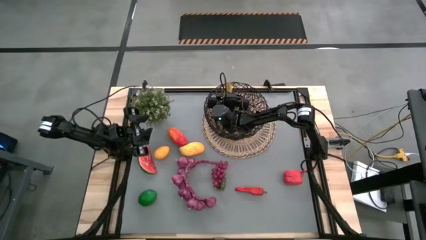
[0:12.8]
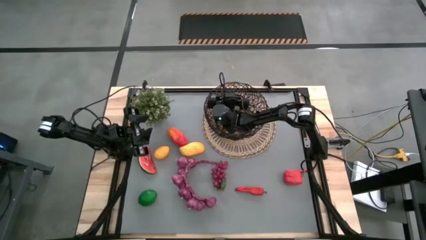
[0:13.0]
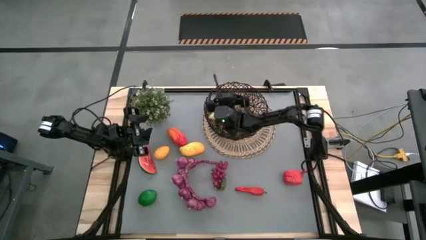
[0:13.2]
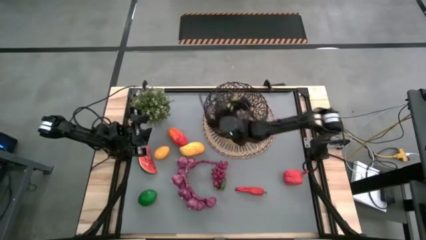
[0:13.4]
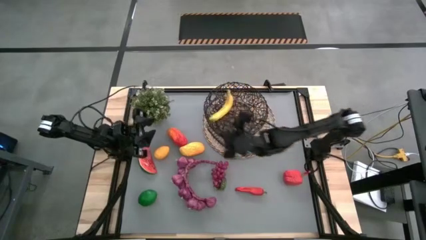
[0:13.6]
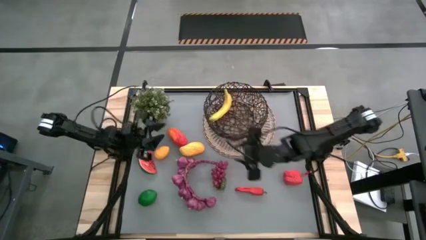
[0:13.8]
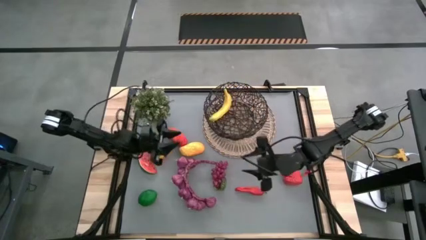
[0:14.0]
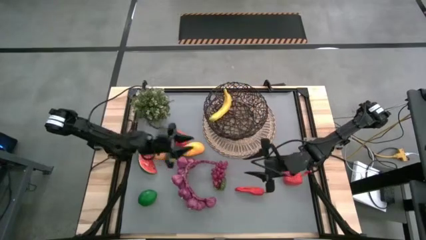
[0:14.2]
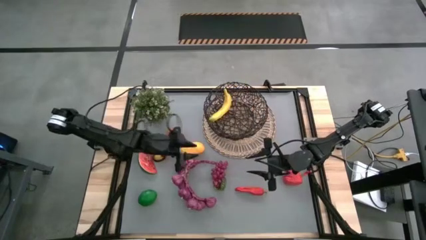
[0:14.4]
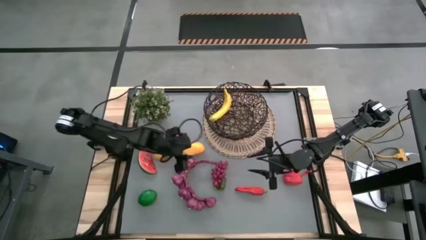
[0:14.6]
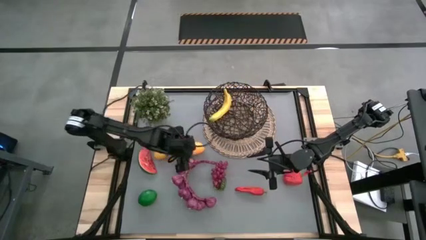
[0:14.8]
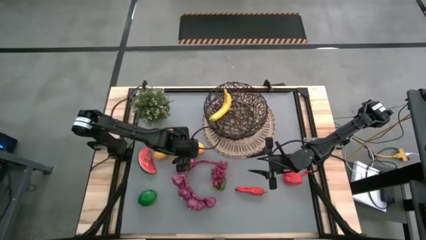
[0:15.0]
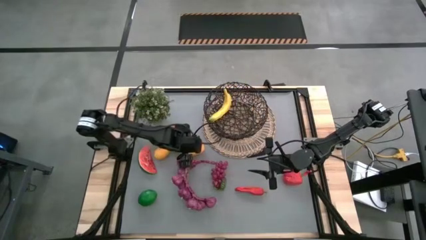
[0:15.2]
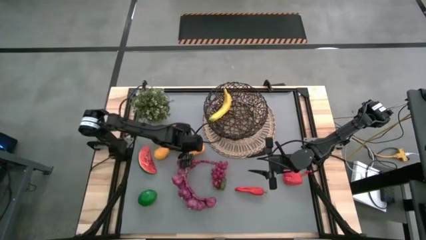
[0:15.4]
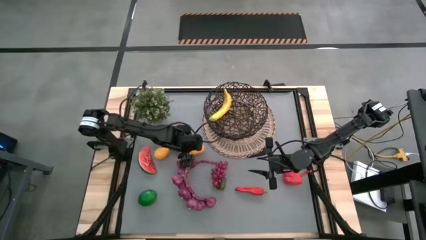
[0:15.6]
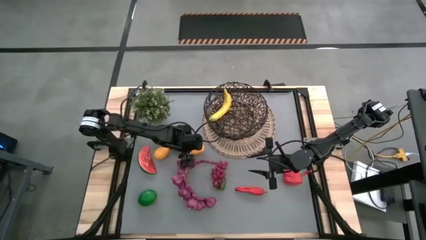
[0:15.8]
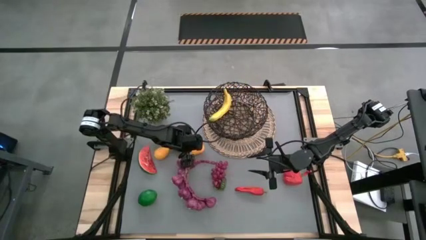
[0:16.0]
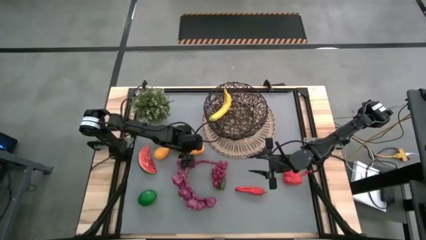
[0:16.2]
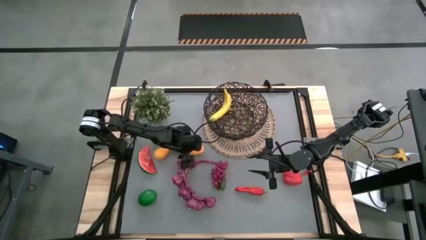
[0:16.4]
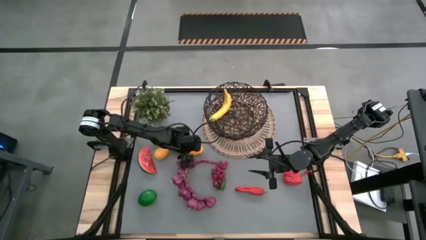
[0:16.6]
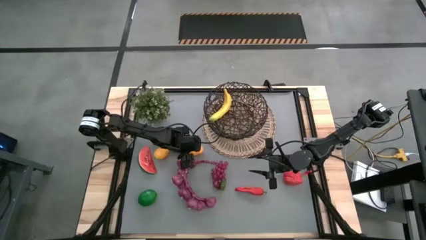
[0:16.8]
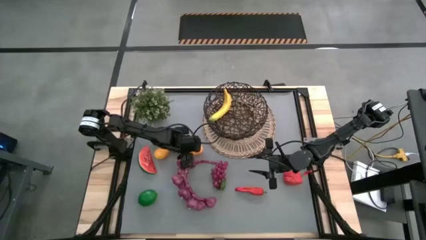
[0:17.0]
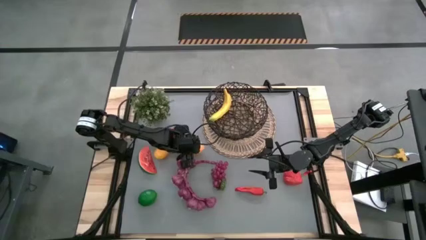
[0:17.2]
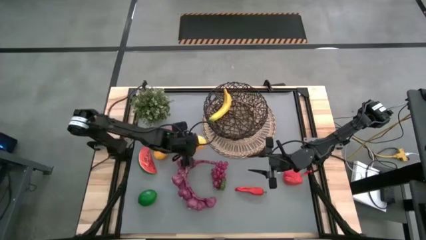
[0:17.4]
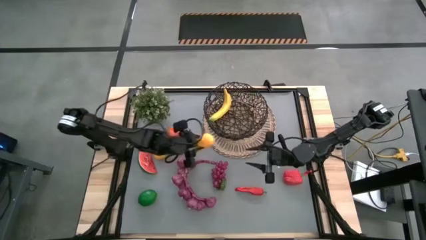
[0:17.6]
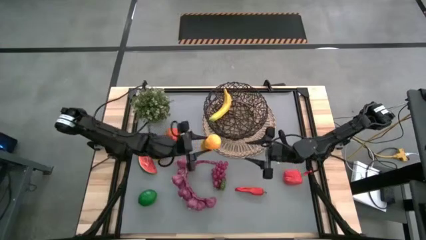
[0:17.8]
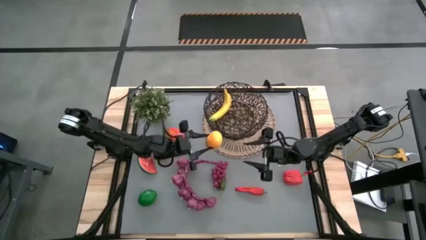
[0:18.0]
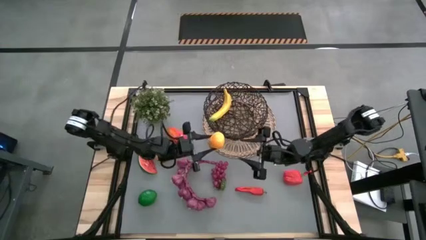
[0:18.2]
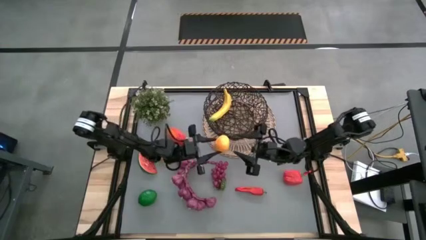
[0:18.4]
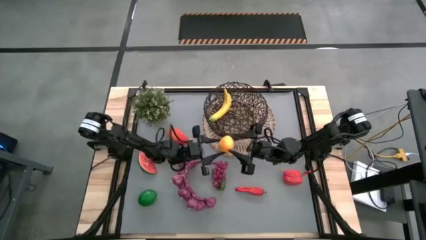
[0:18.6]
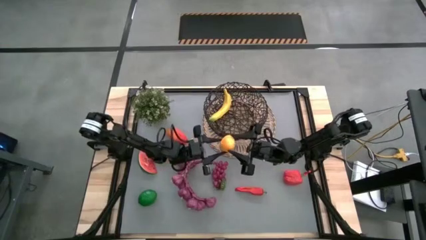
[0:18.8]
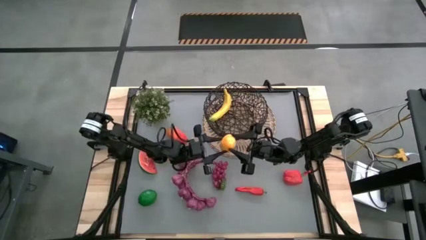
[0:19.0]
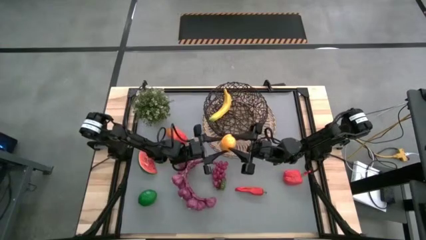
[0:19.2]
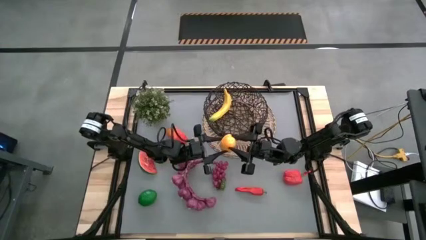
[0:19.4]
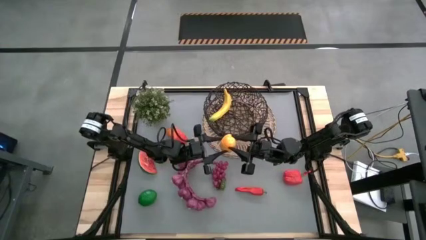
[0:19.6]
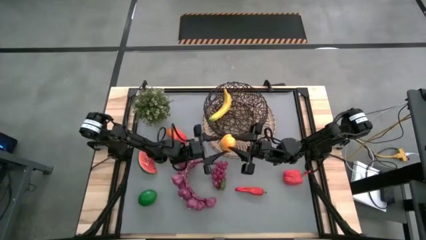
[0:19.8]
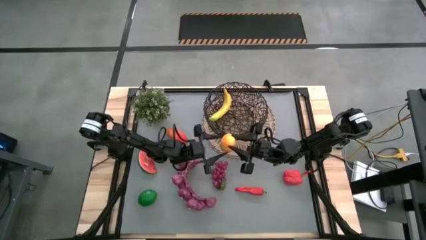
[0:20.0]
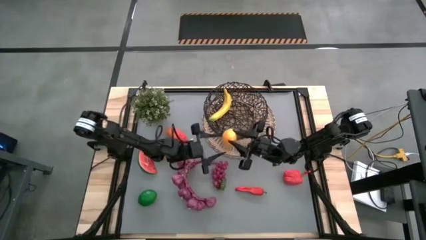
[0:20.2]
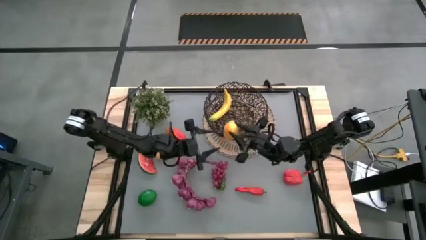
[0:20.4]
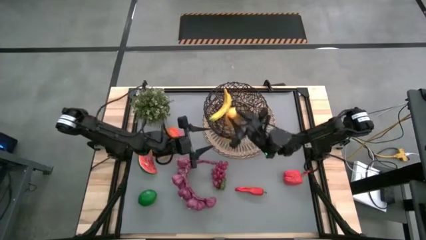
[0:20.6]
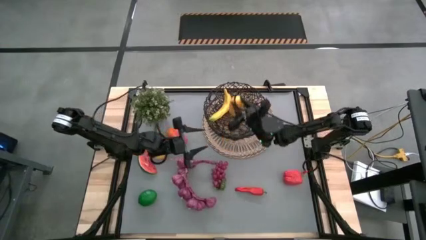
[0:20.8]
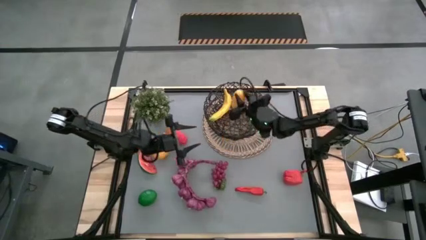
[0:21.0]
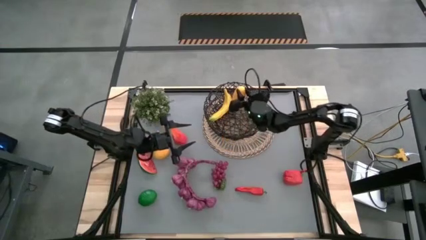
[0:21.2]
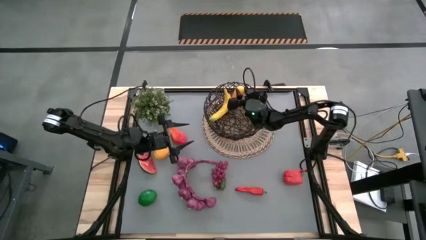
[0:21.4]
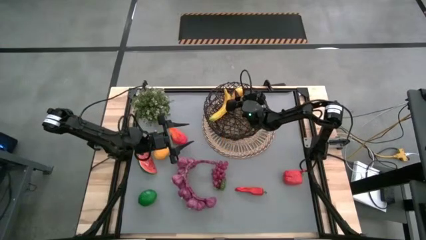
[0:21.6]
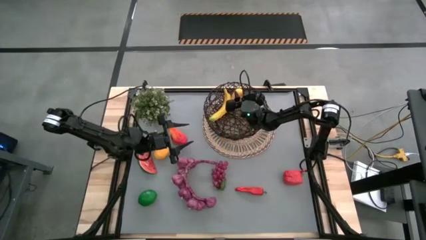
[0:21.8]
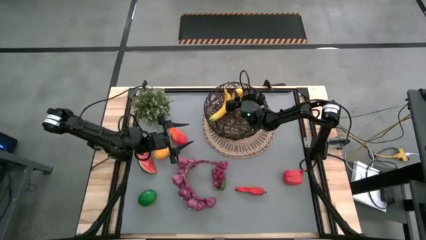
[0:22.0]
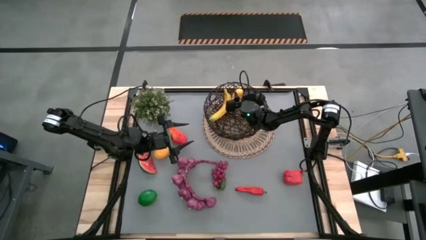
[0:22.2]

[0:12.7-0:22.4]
Task: Build produce basket
Put the yellow mango into the black wire basket

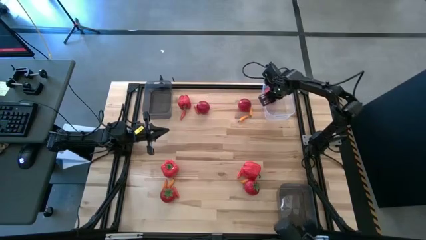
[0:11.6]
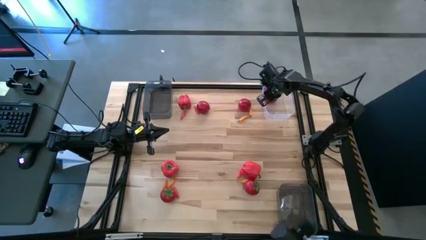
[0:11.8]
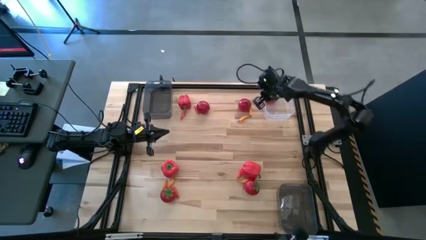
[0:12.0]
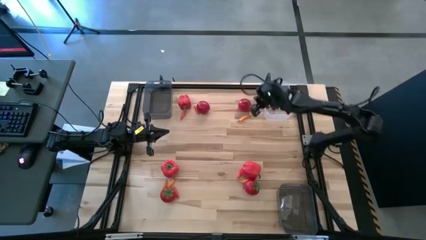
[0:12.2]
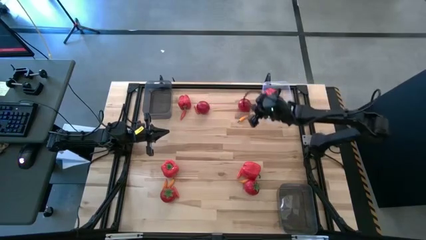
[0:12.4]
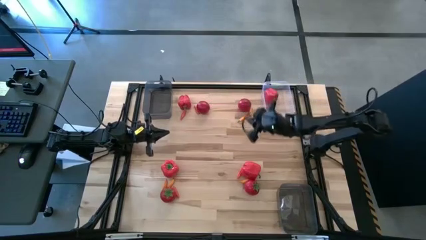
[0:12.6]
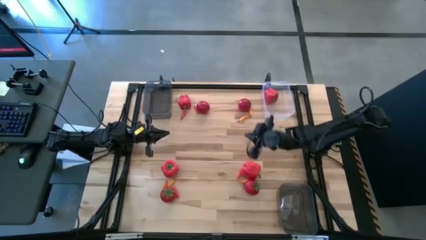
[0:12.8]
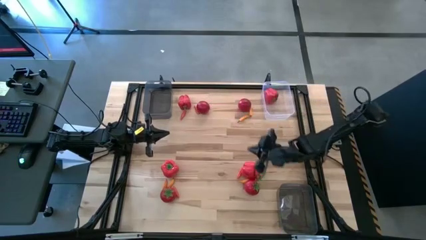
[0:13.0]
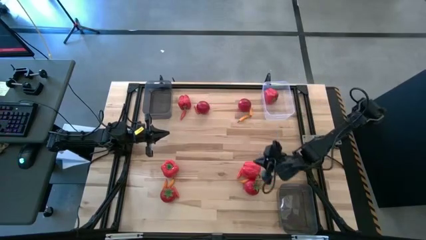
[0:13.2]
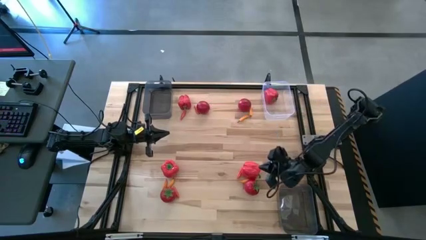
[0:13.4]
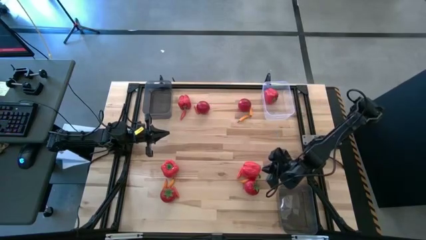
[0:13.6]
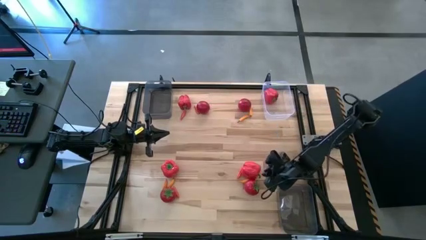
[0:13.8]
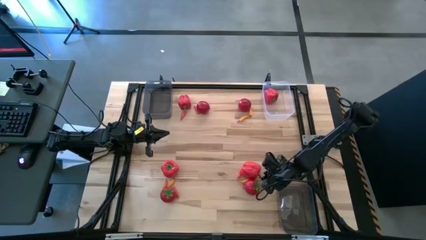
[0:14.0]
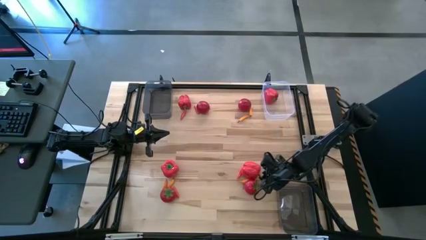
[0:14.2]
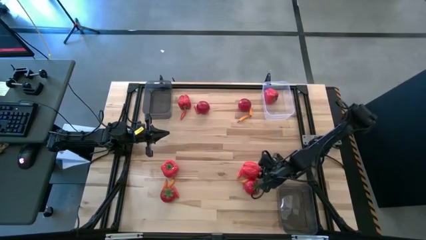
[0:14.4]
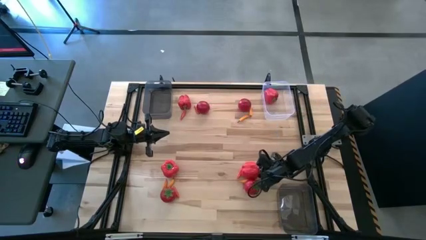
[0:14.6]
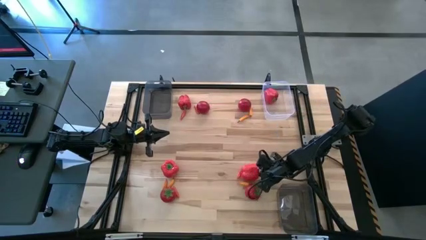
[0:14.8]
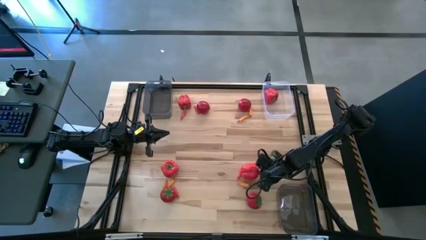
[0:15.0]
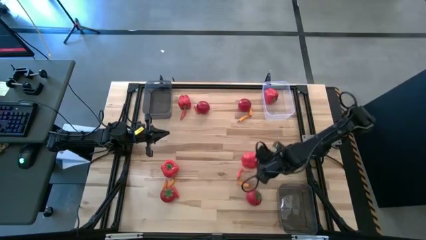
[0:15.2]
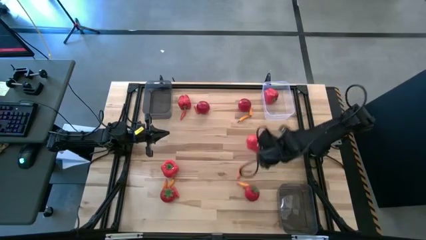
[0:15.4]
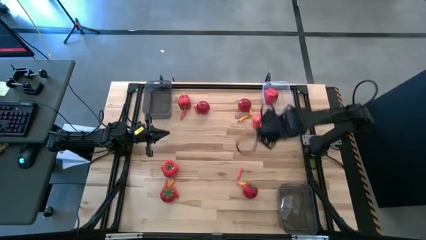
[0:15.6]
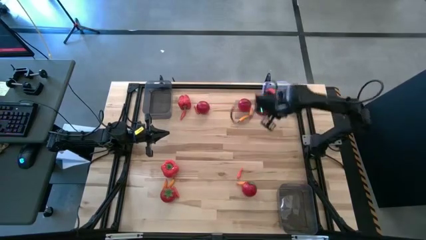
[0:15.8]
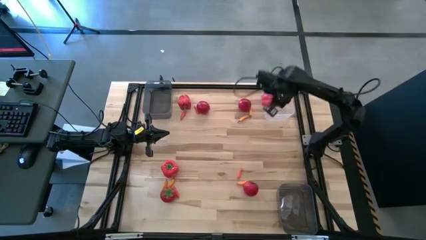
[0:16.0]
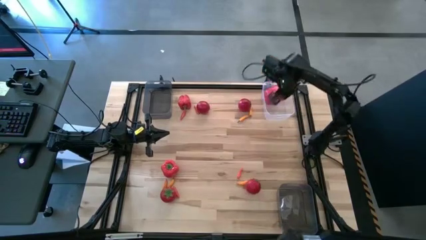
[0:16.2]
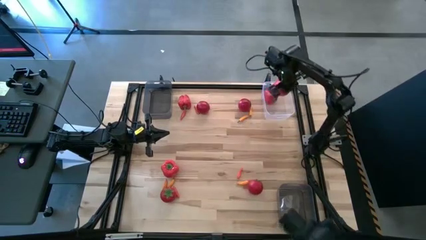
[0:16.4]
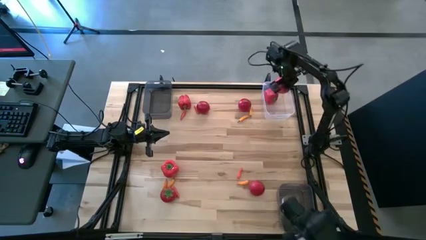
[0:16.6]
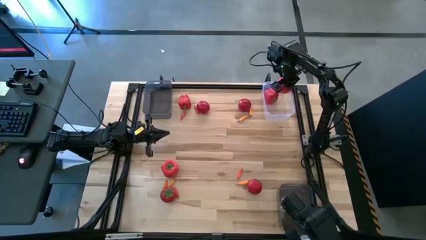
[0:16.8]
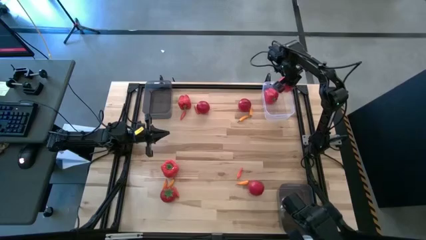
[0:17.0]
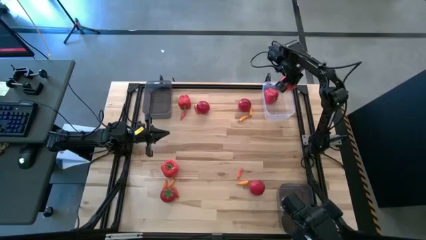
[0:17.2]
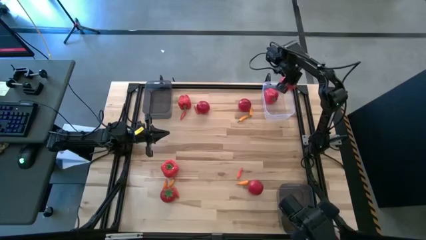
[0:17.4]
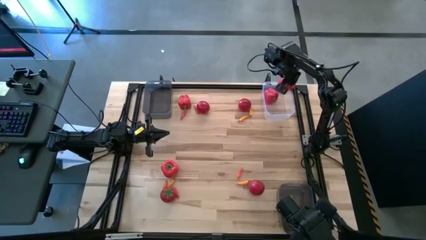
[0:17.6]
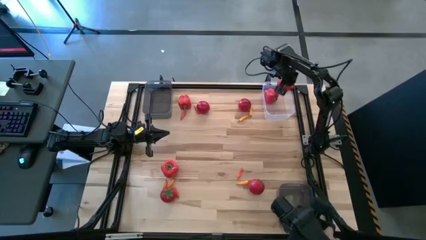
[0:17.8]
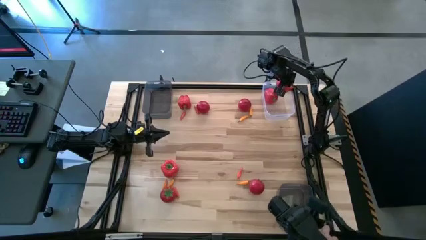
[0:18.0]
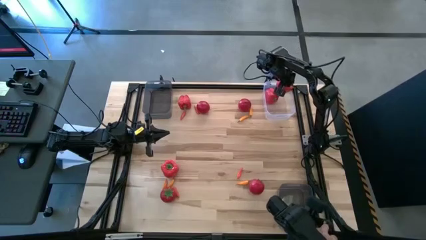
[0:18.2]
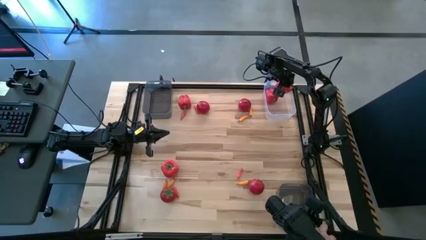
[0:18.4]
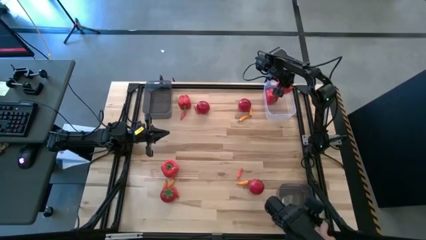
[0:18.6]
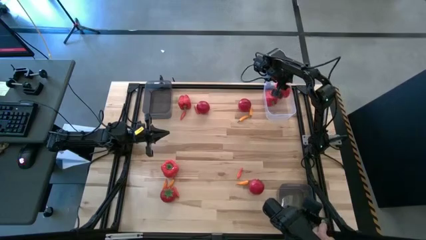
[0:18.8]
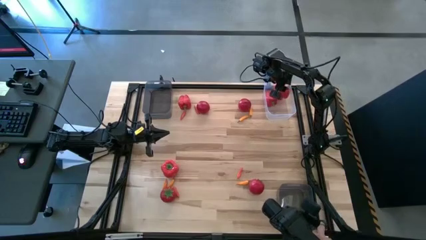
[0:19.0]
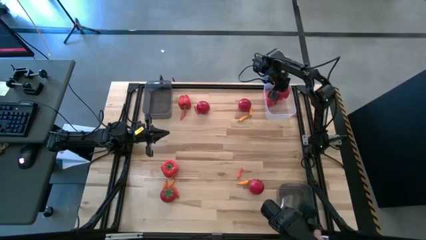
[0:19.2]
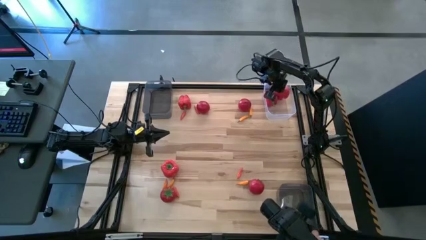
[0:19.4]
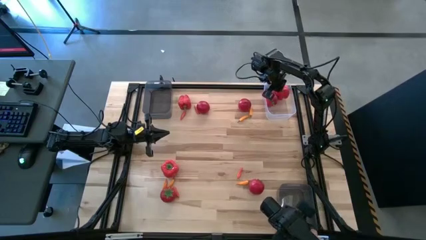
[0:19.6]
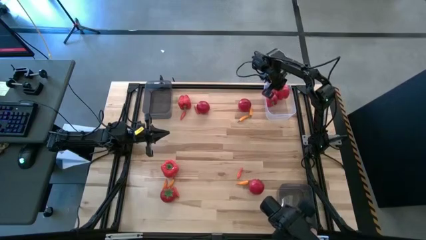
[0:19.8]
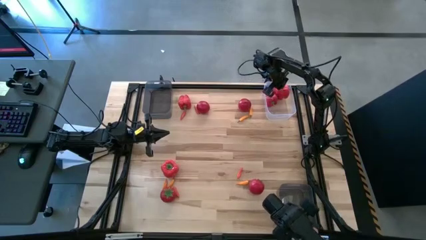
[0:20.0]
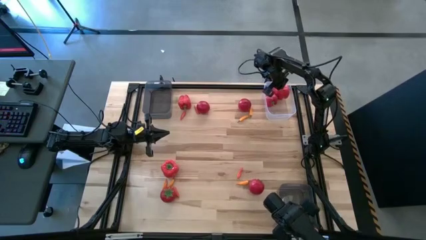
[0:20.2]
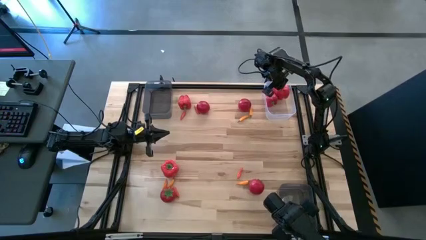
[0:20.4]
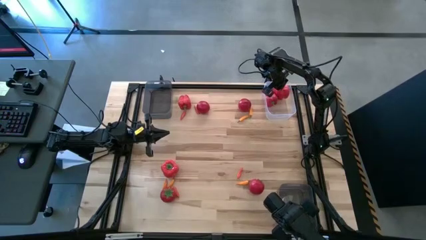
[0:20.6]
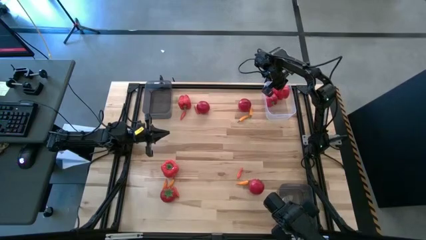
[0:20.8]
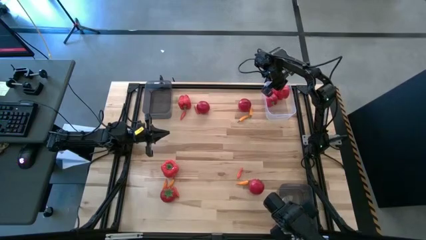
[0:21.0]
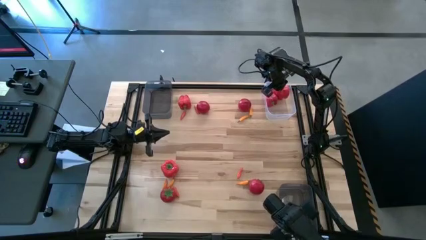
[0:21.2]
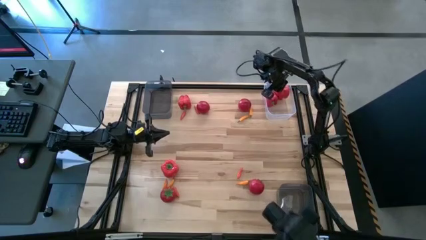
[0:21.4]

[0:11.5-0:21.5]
Task: Sort produce into baskets
Put the red bell pepper into the transparent bin
